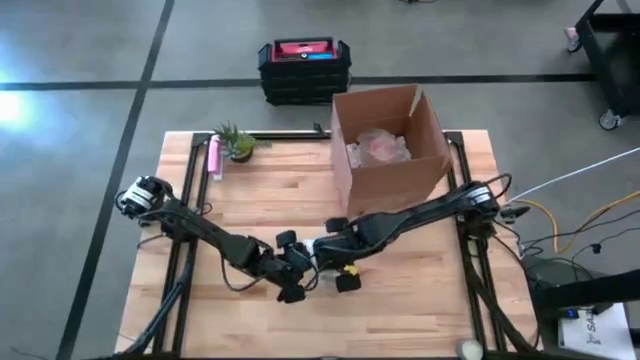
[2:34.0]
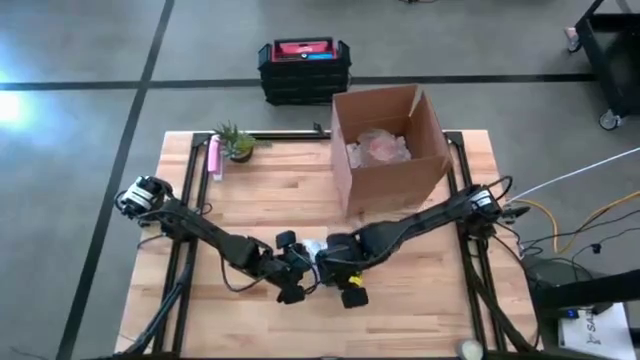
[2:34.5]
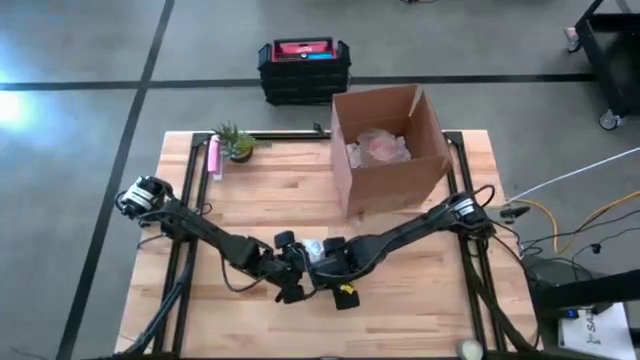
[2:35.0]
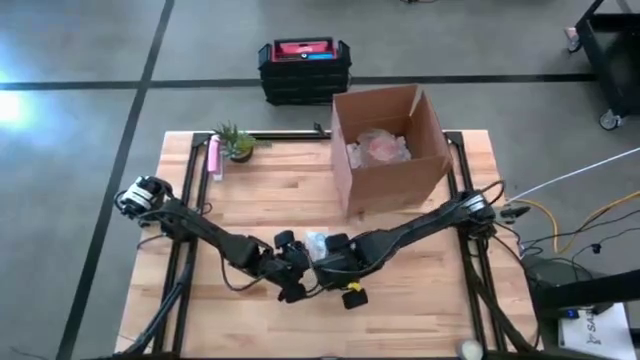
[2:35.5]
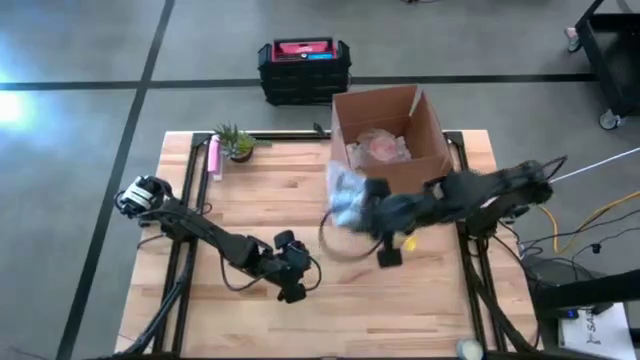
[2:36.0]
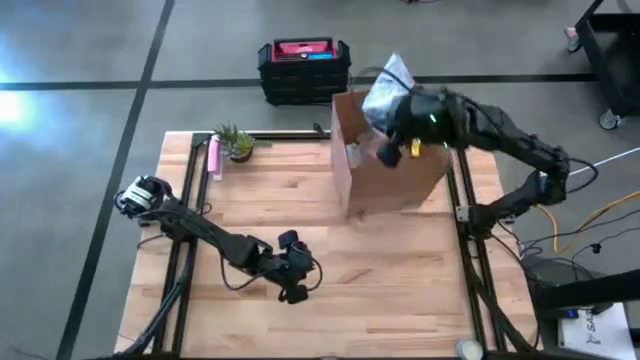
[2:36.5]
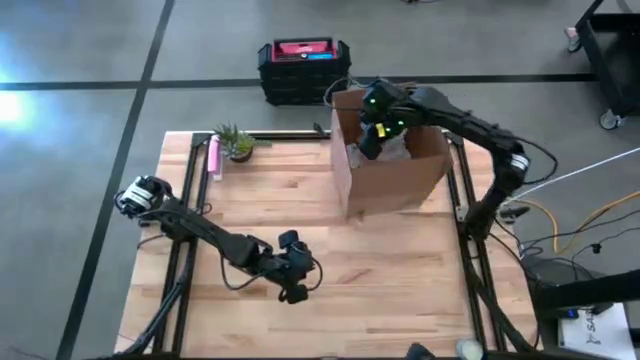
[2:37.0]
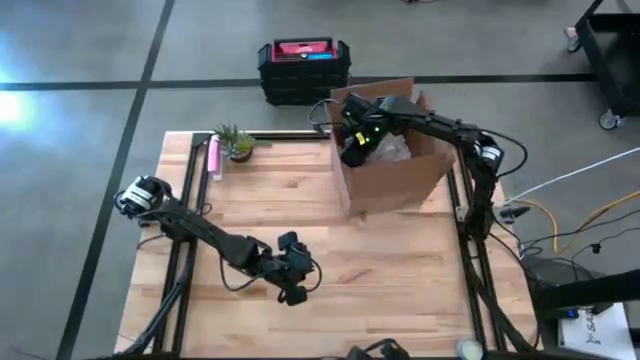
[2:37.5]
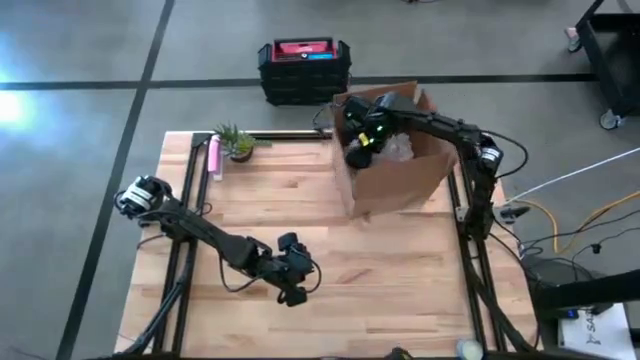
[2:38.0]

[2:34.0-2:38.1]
Task: wrap mug
Put the wrapped black mug into the brown cardboard box

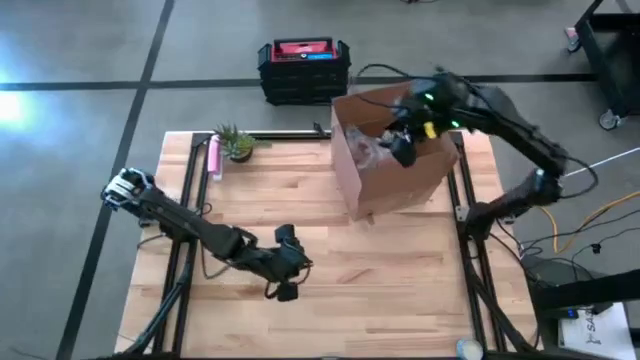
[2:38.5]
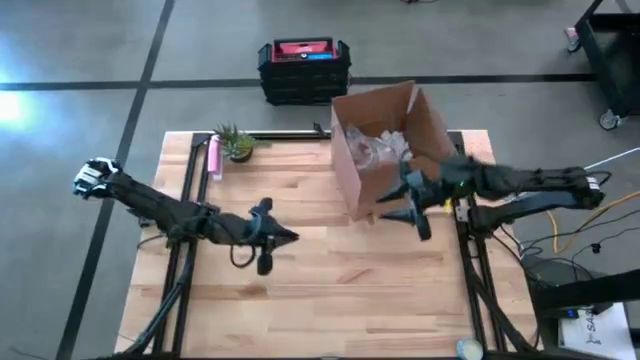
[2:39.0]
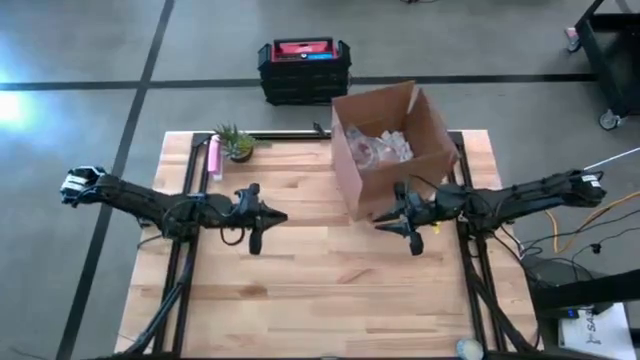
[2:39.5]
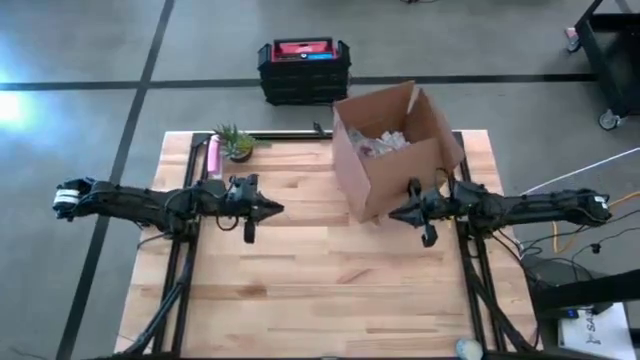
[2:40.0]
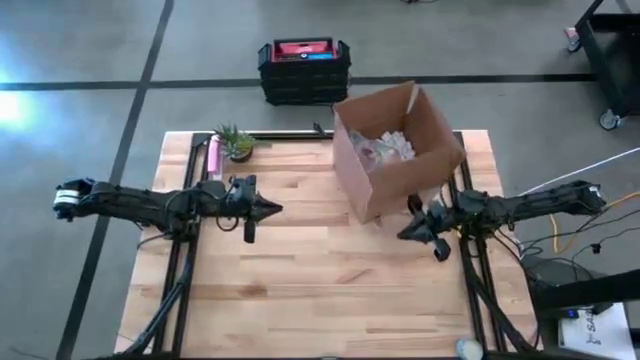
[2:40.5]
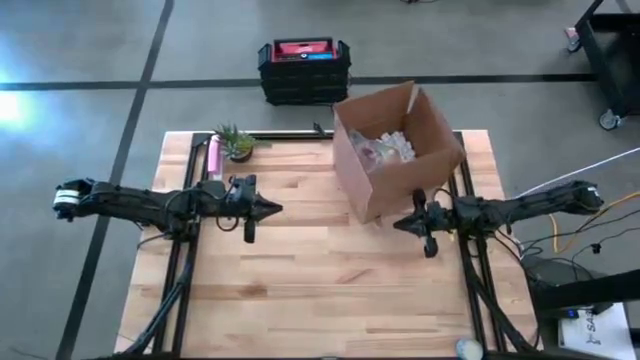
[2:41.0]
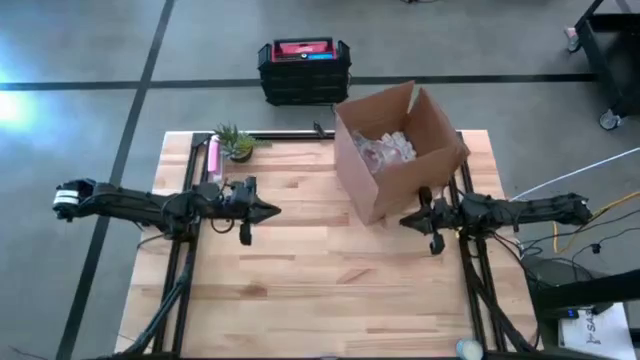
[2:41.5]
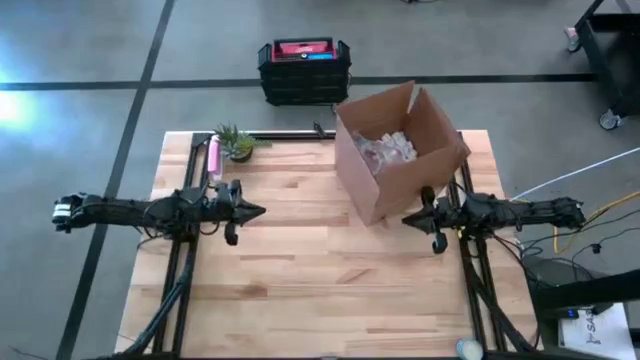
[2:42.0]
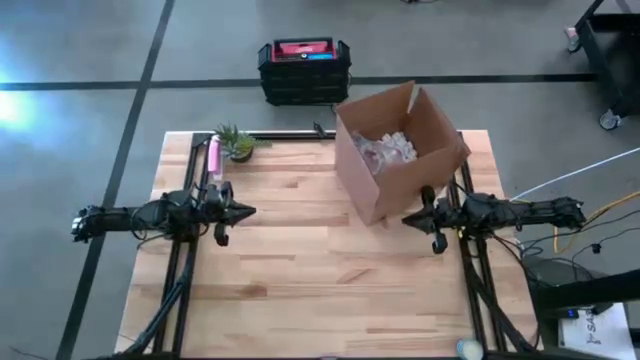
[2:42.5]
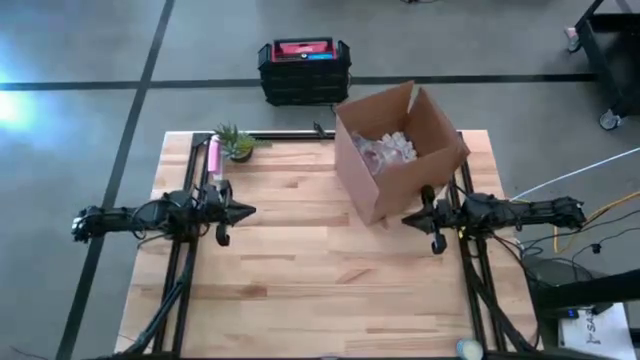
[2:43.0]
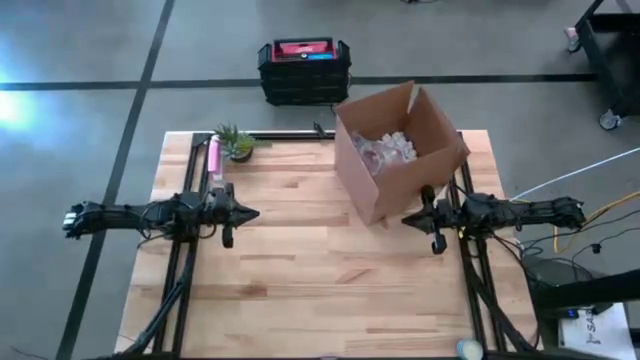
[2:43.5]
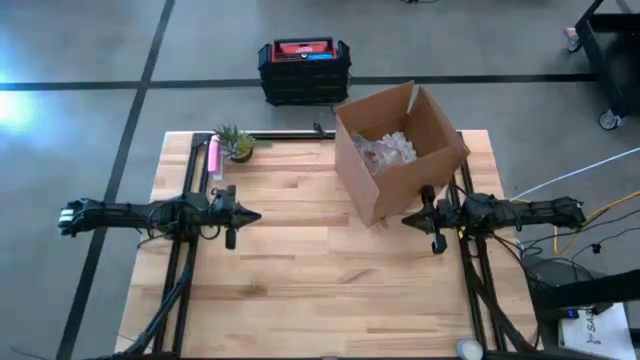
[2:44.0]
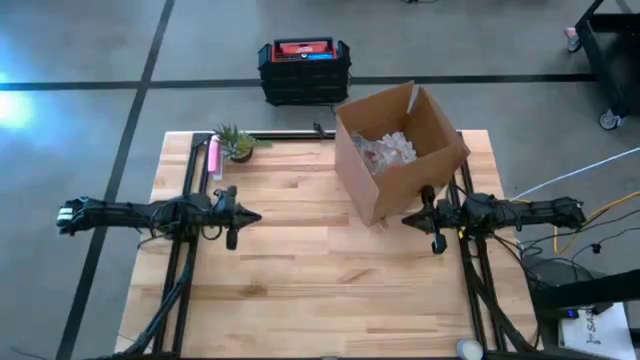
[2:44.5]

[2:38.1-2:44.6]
Return to Home Position

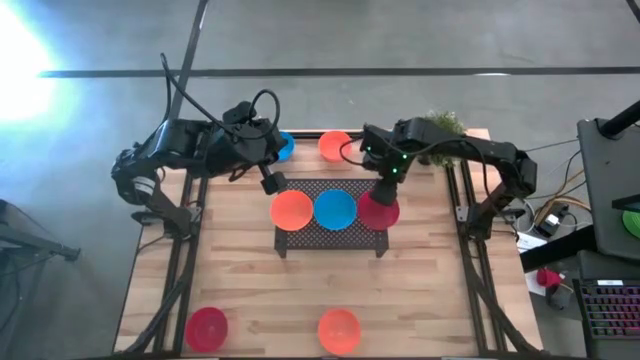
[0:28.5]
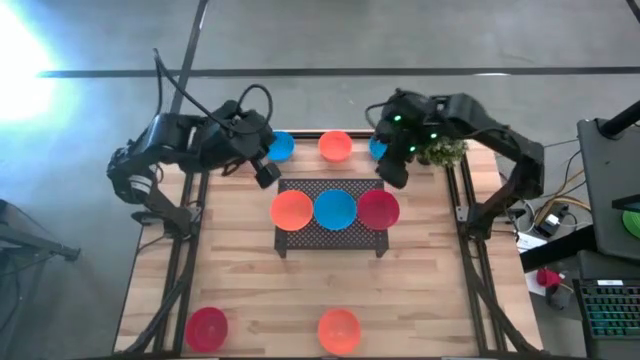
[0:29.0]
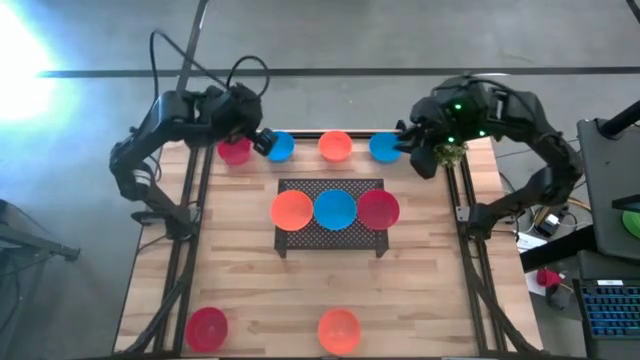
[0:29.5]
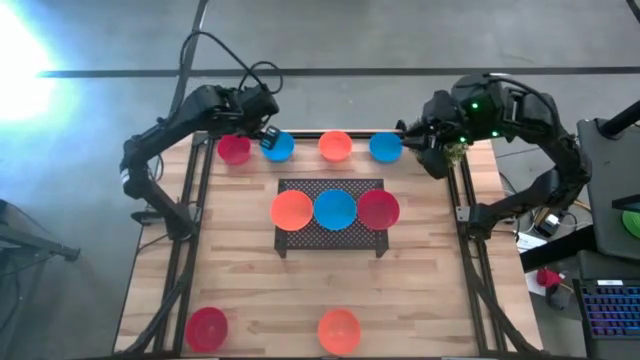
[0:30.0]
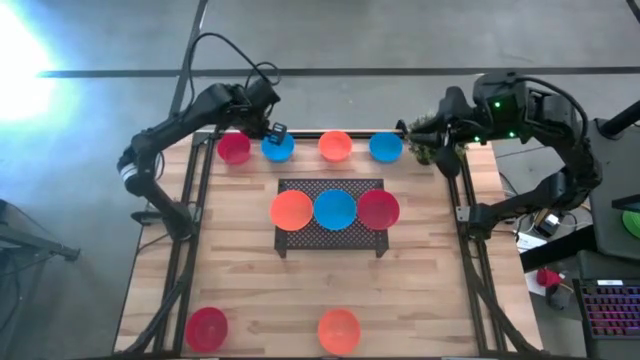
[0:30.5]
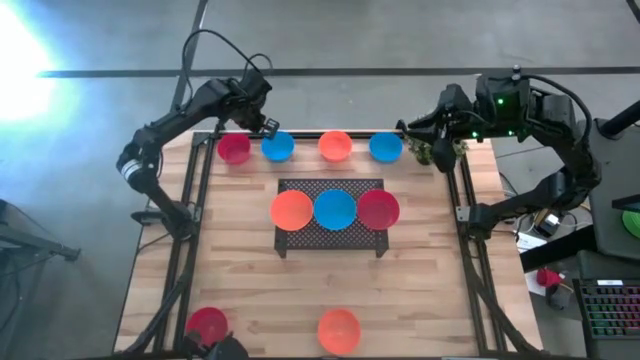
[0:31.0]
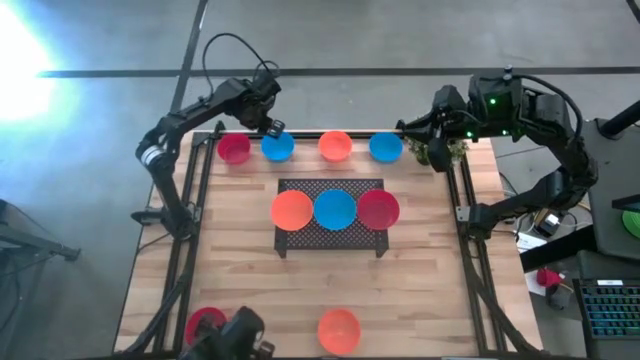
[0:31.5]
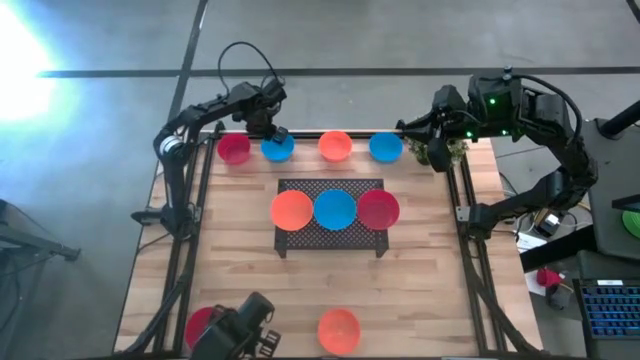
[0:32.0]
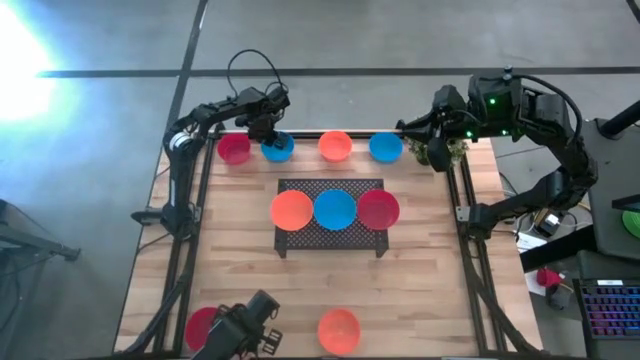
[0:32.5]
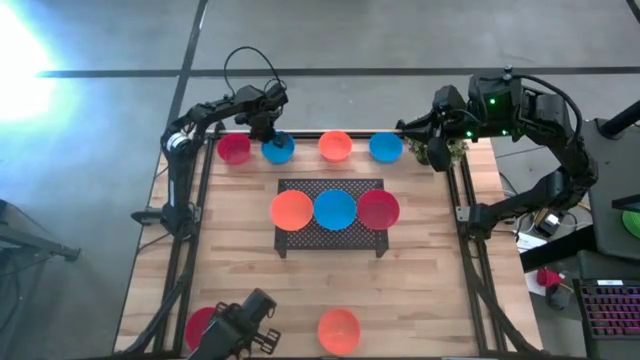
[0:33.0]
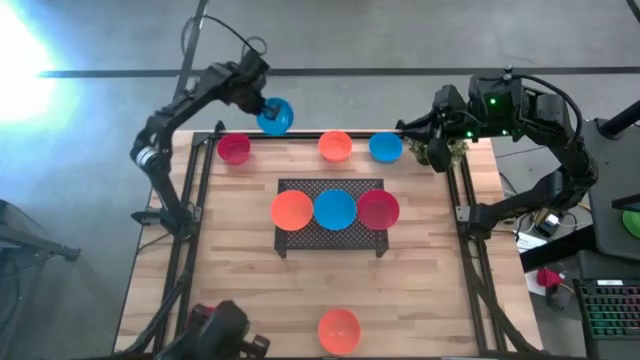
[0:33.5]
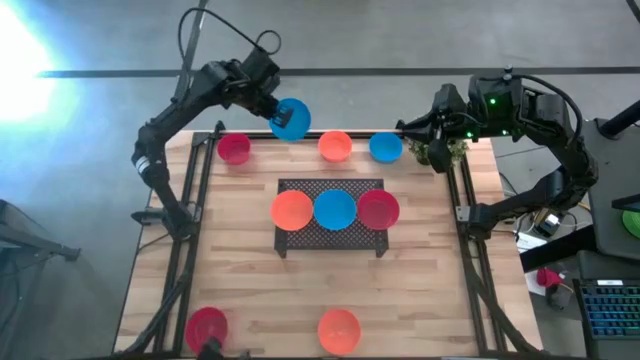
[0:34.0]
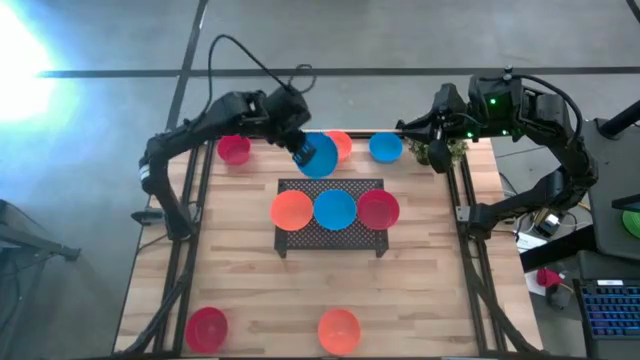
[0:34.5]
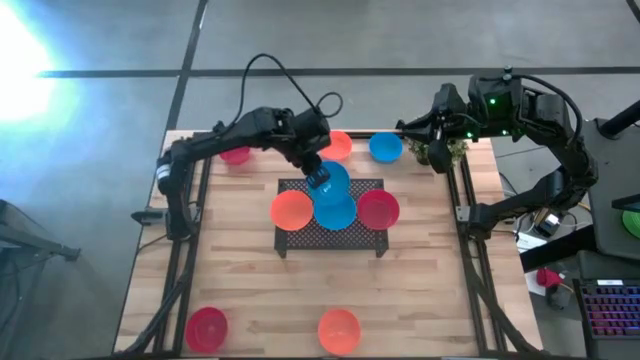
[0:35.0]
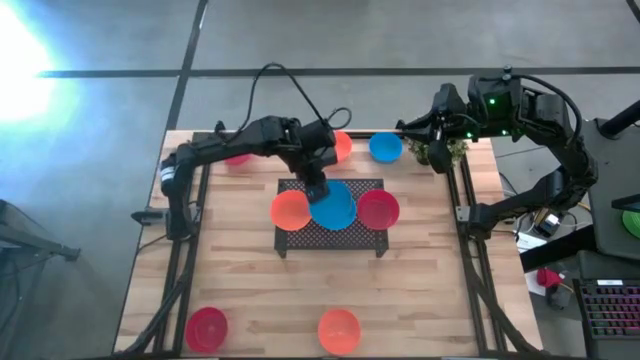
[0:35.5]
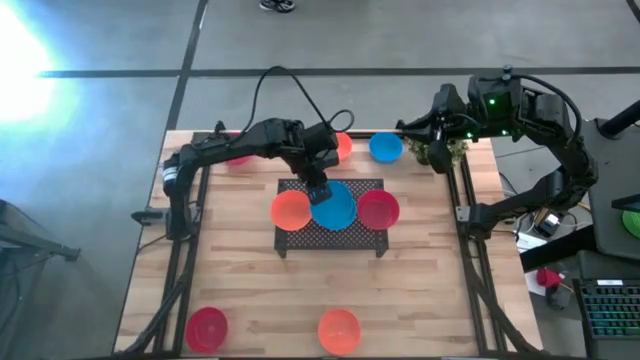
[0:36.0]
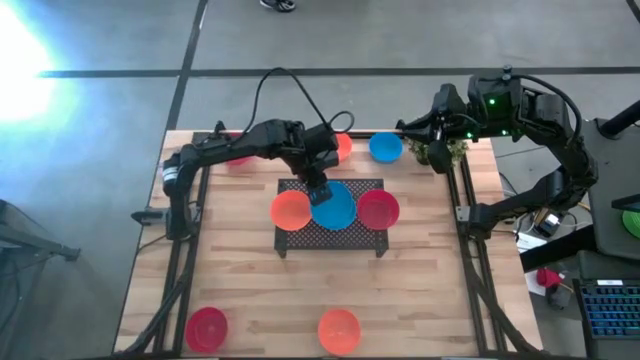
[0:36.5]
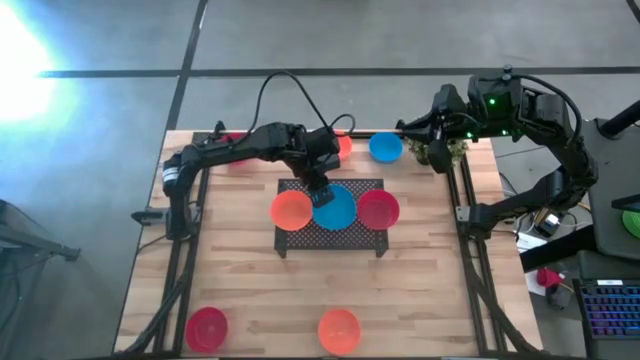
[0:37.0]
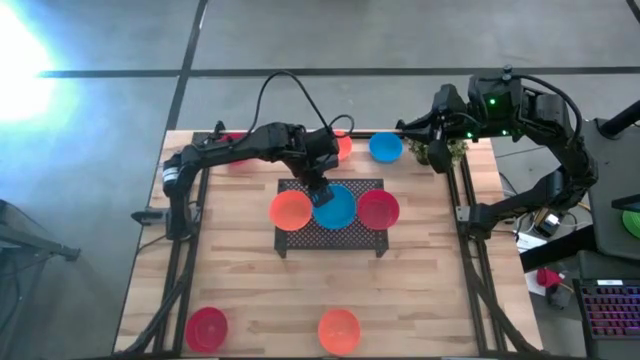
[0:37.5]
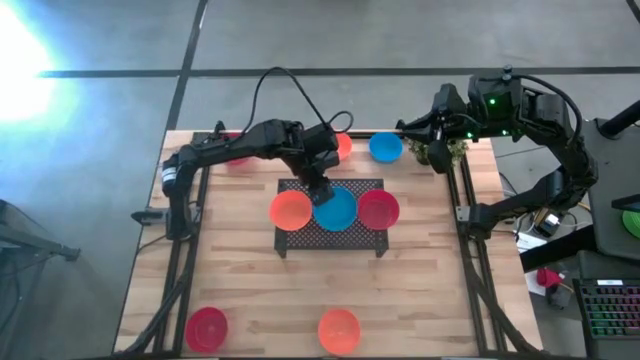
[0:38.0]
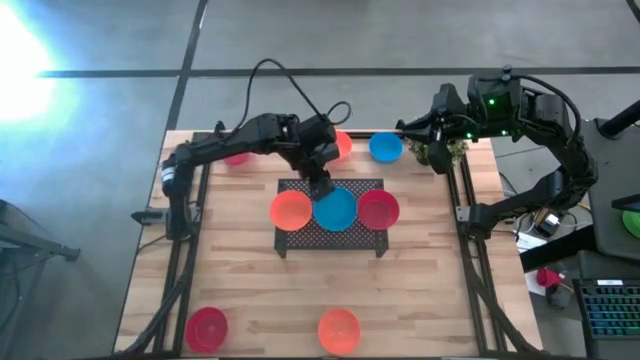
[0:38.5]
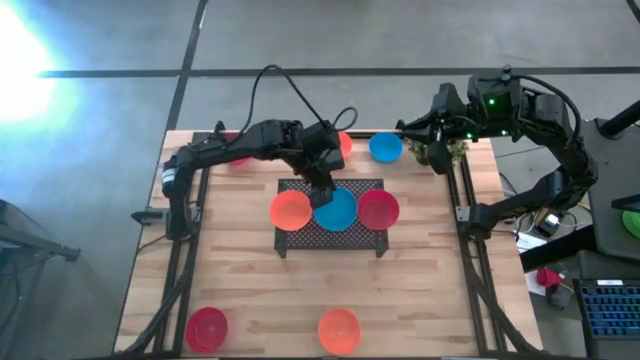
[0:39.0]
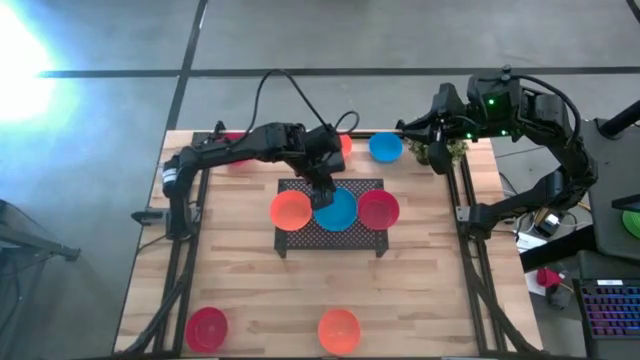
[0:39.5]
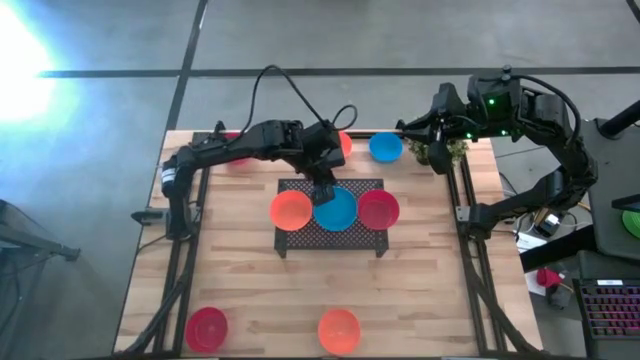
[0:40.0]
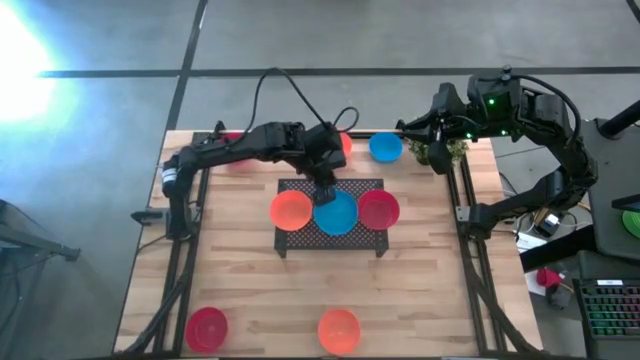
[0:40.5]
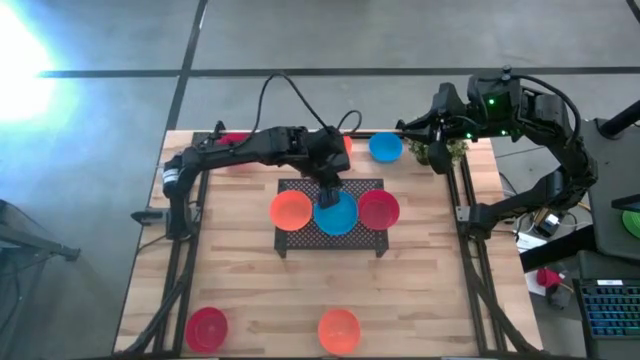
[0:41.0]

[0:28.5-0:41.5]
Task: Pick & Place Mini bowls
Stack the left blue bowl on top of the blue bowl on the shelf
